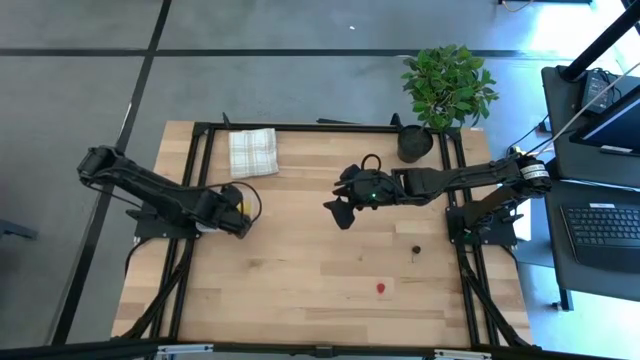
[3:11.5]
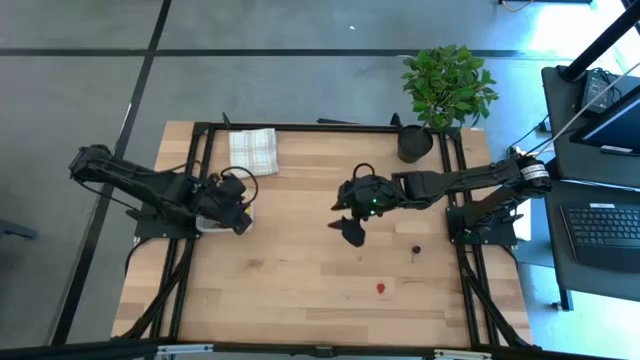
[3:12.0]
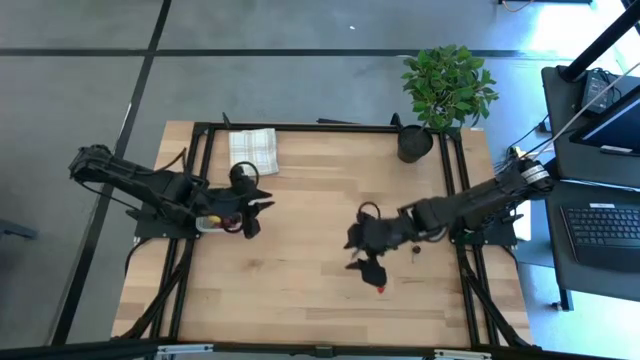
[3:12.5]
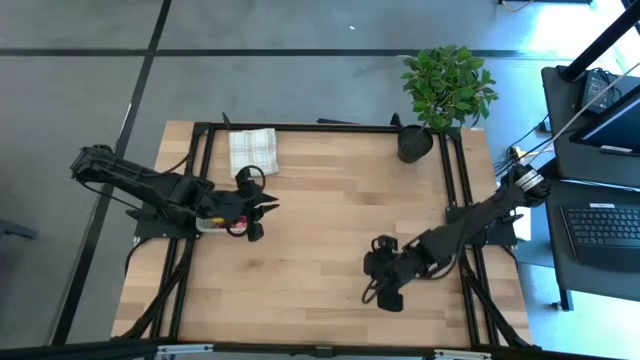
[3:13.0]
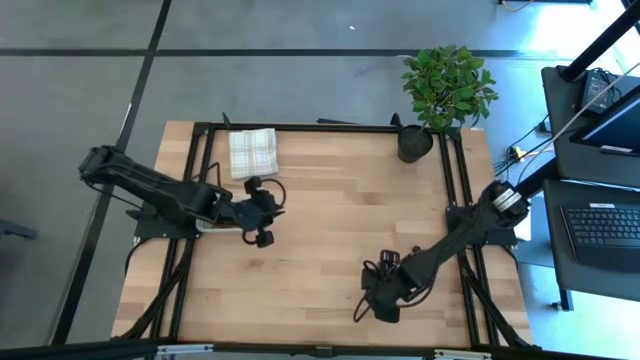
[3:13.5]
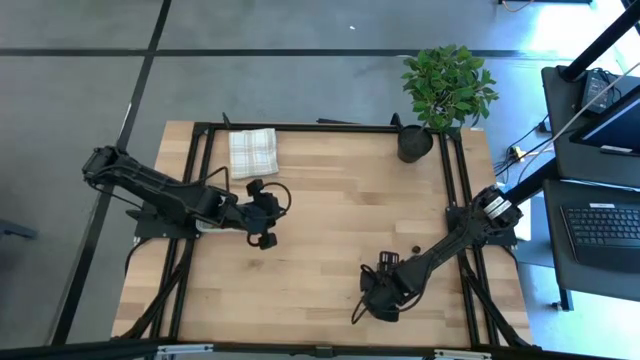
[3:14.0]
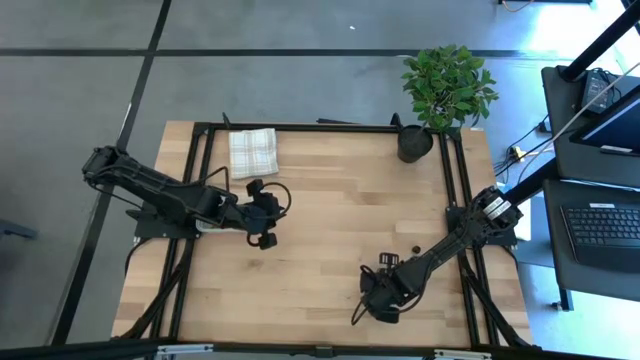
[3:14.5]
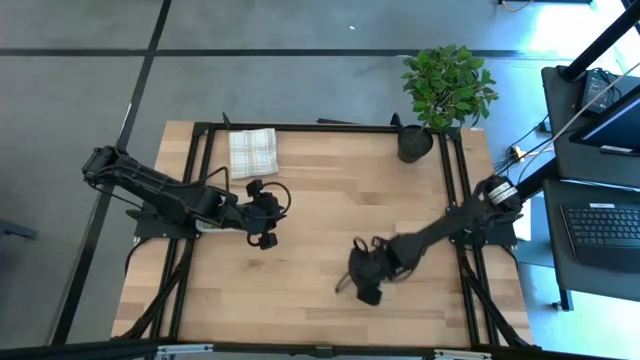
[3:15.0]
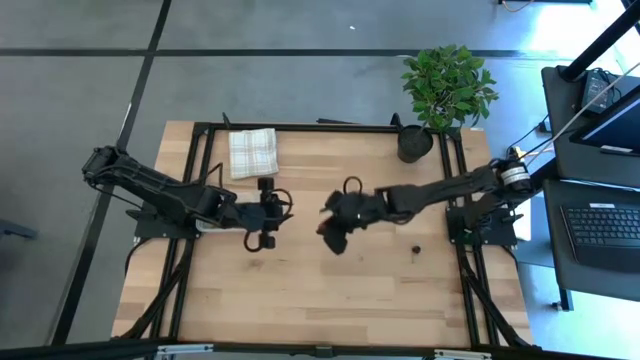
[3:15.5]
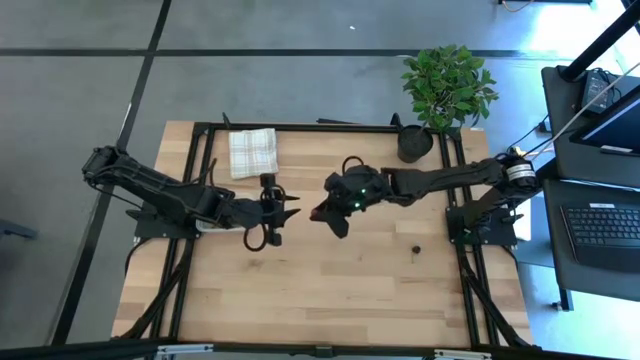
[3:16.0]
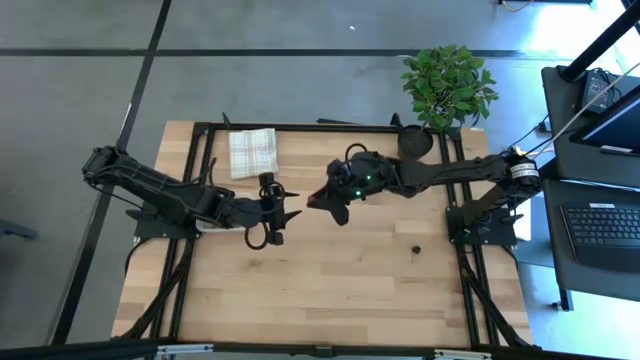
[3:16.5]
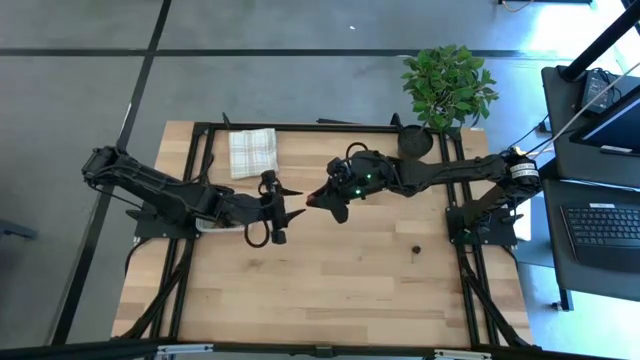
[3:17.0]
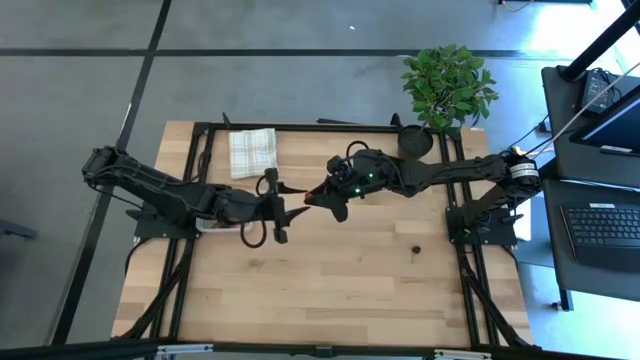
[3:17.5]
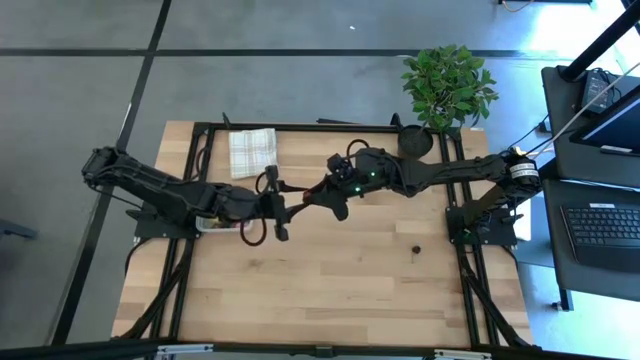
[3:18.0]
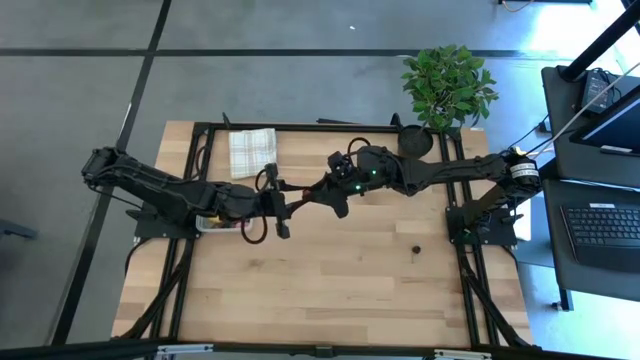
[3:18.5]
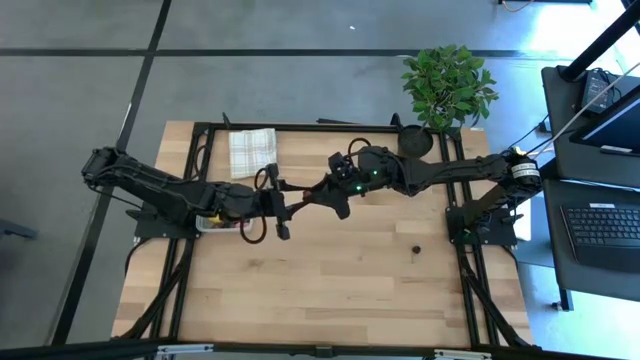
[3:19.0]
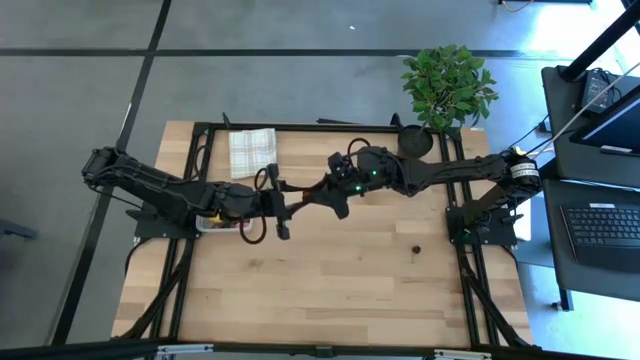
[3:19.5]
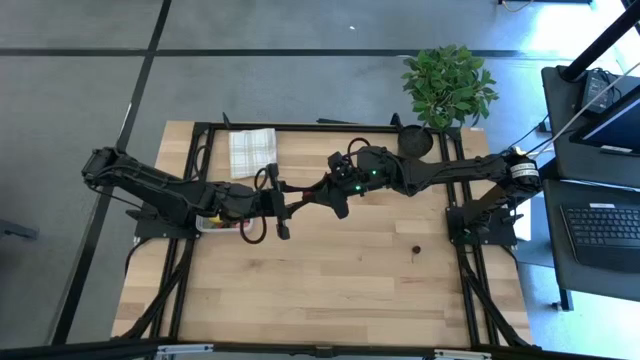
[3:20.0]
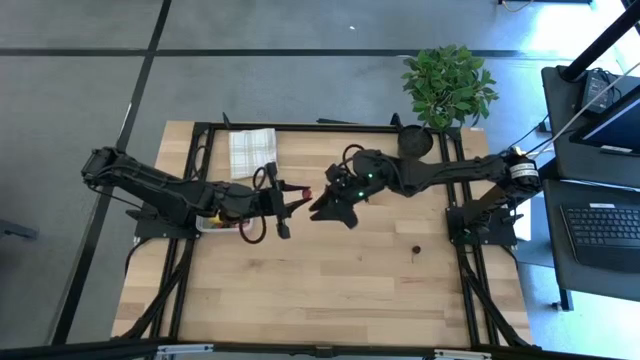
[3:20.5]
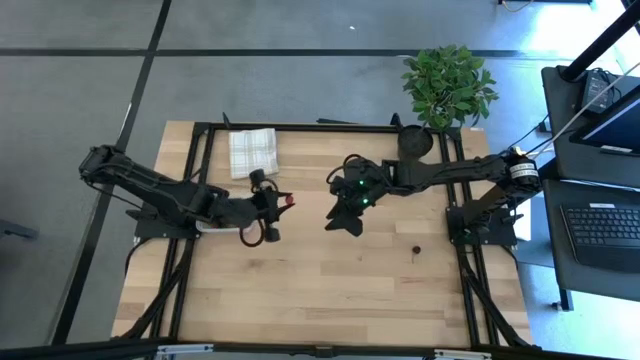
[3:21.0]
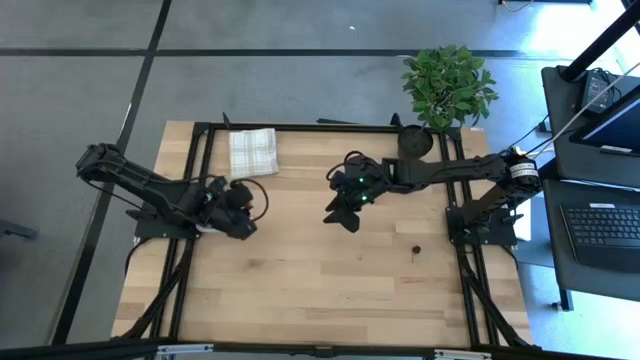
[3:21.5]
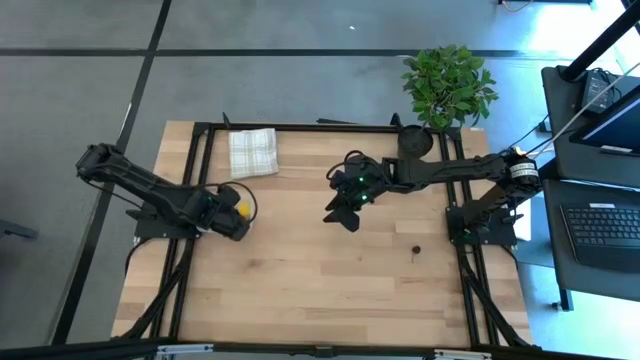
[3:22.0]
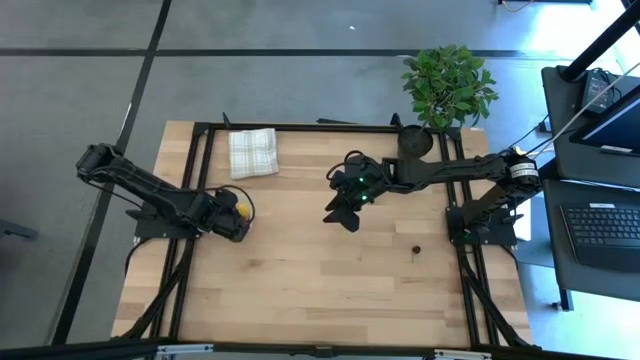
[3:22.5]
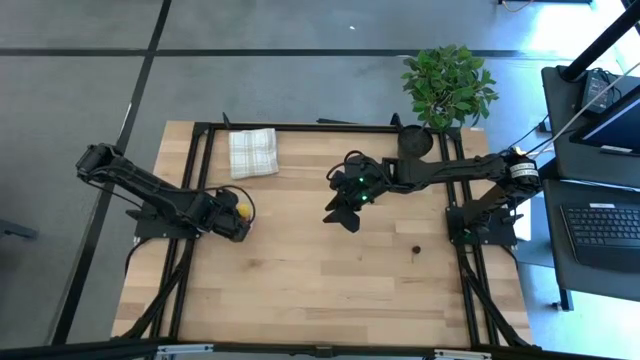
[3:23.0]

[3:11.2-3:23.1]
Task: Pick and placing Produce into tupperware
Put the red raspberry into the transparent bin

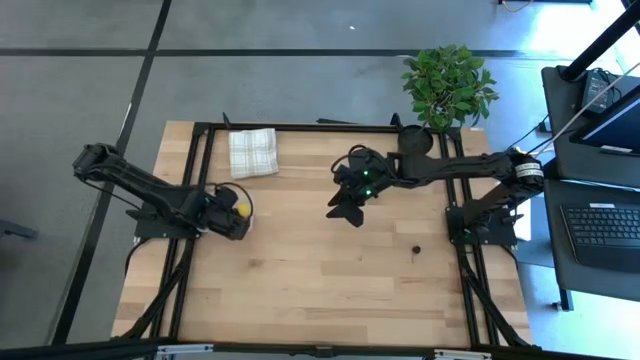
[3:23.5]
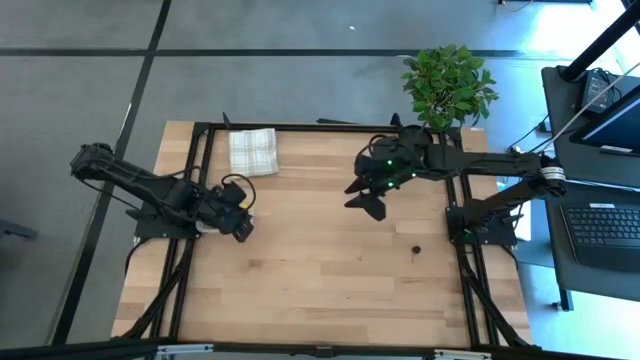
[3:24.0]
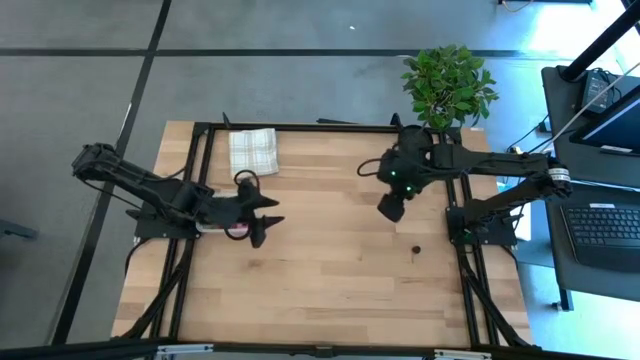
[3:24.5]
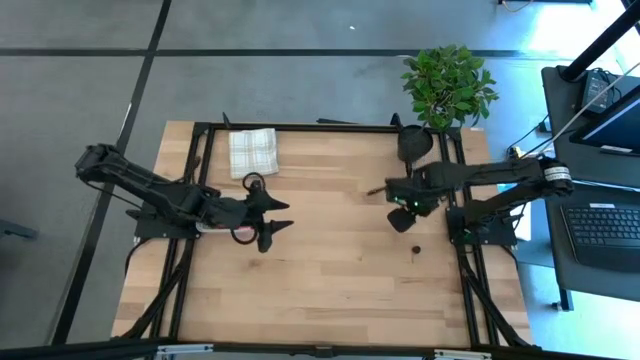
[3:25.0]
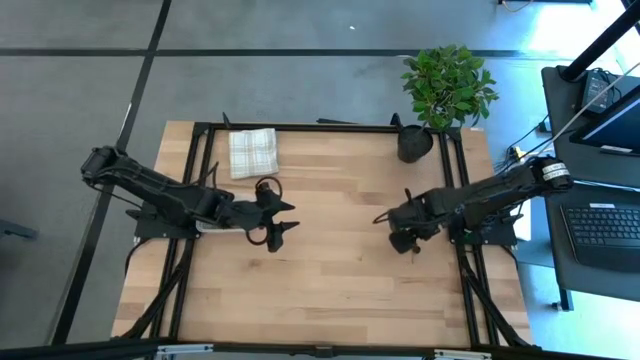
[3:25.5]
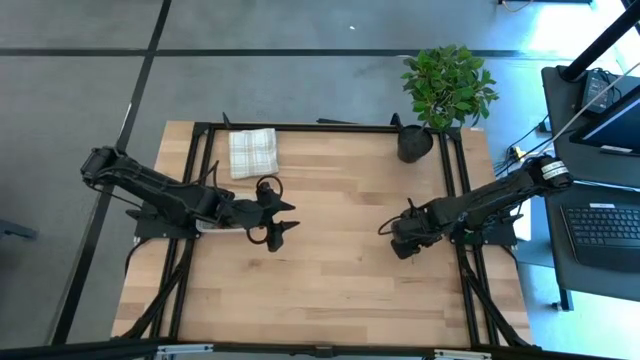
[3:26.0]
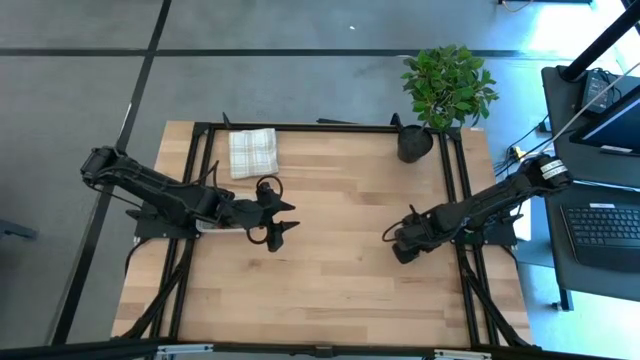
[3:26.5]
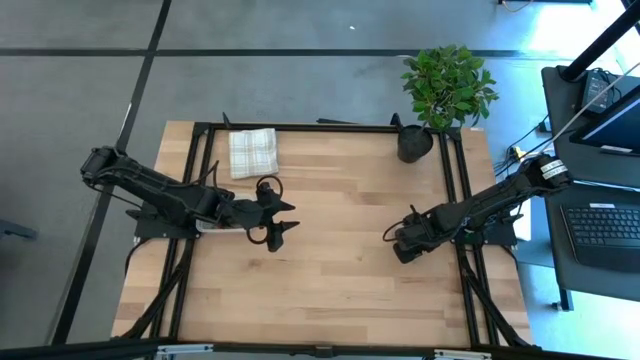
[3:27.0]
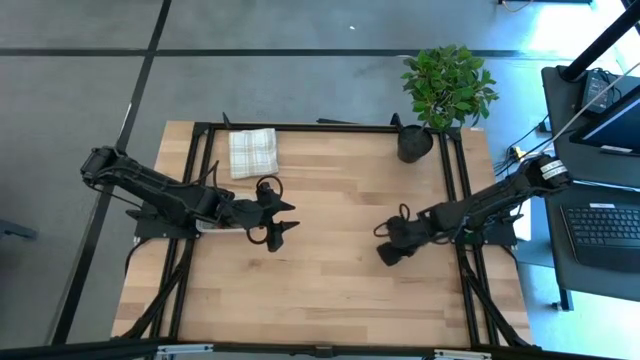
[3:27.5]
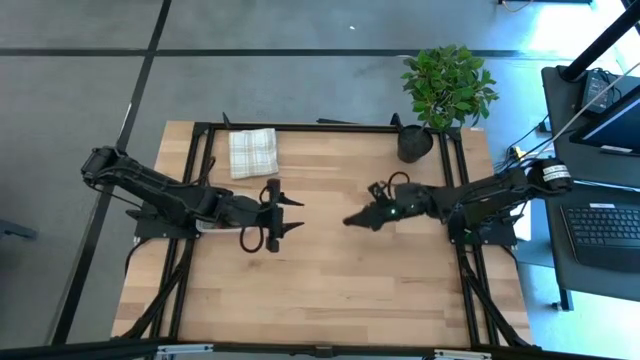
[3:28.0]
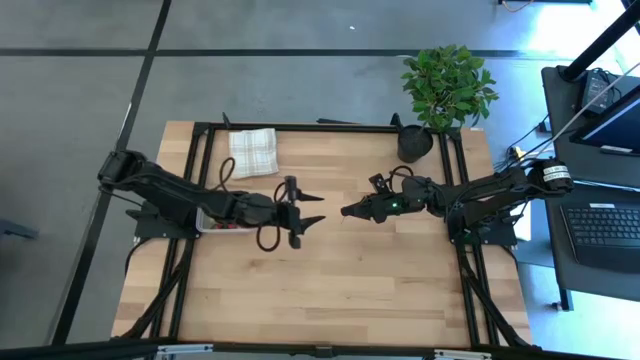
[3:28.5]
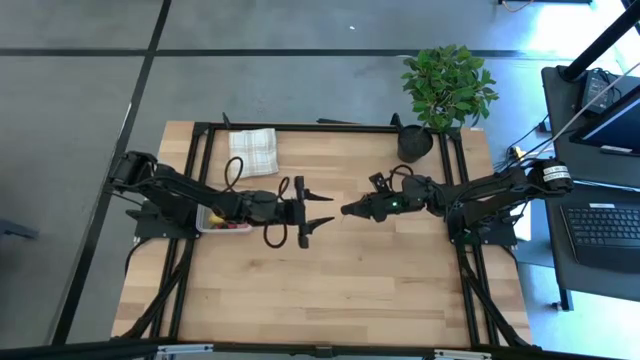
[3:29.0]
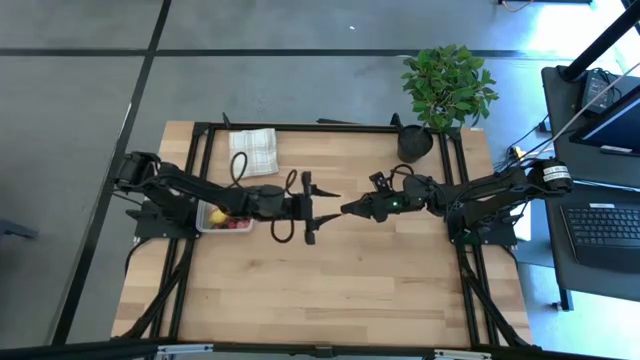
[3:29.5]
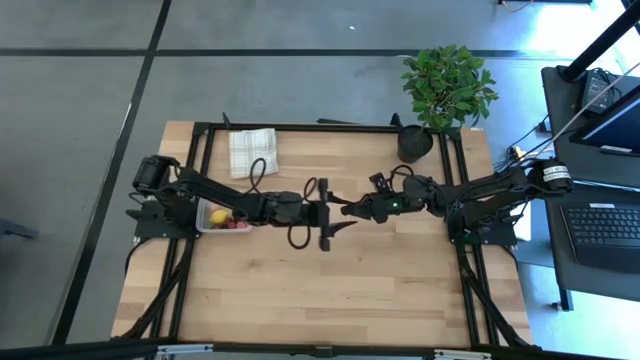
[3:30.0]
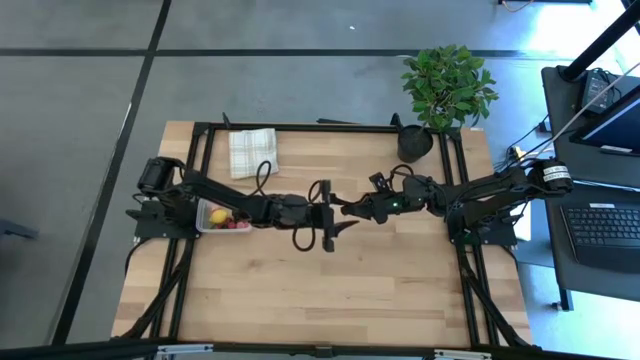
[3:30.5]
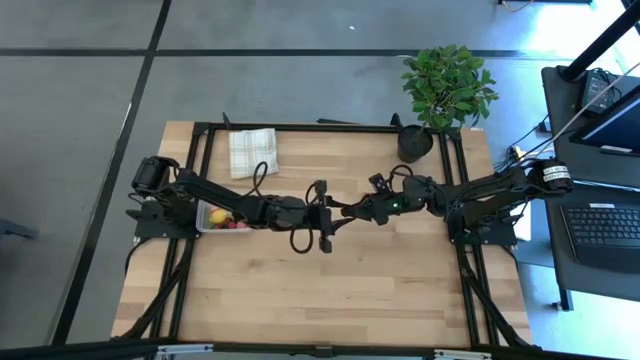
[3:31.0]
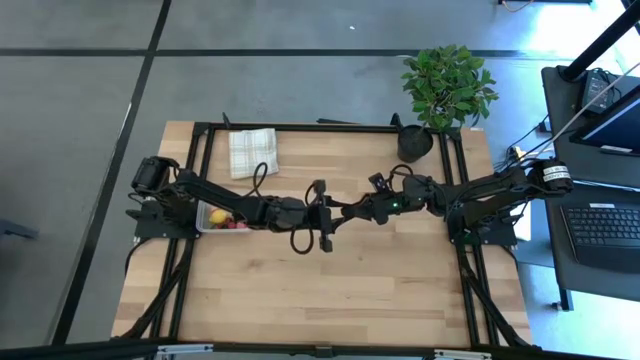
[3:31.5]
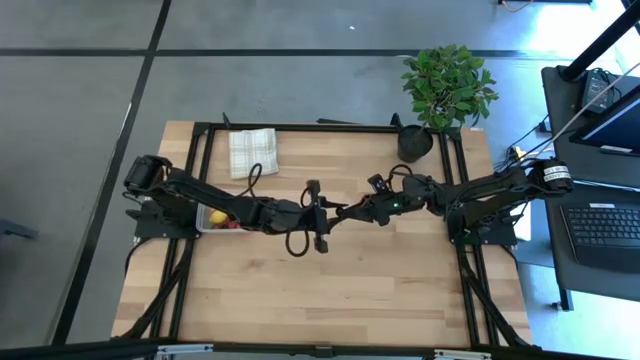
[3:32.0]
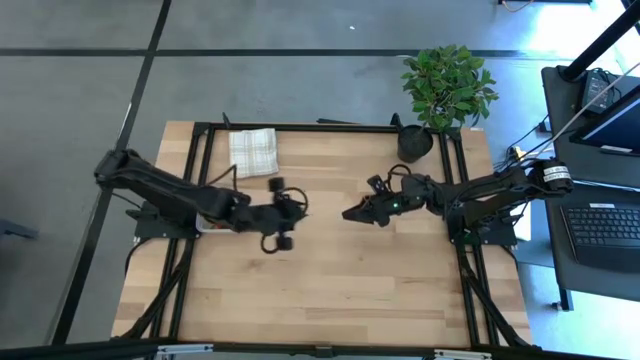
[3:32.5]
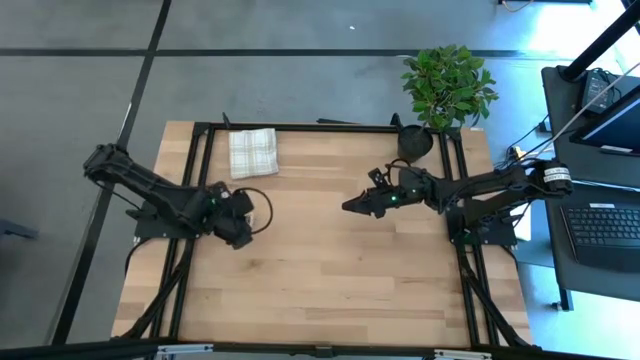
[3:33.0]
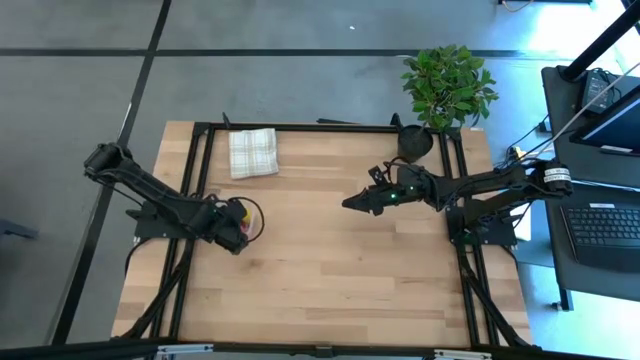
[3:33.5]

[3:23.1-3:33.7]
Put the black cherry into the transparent bin
